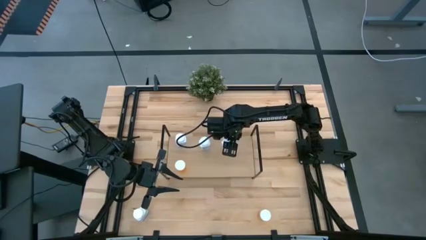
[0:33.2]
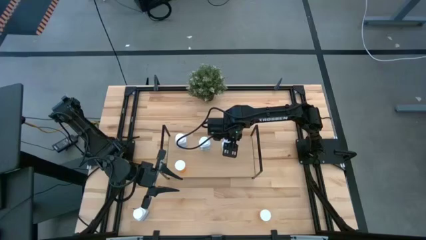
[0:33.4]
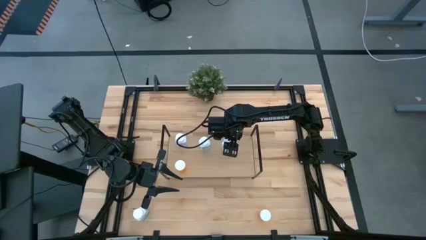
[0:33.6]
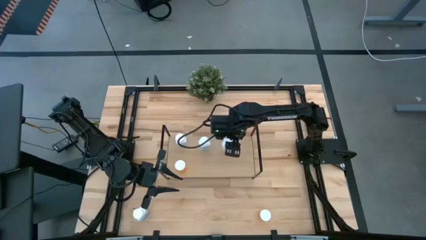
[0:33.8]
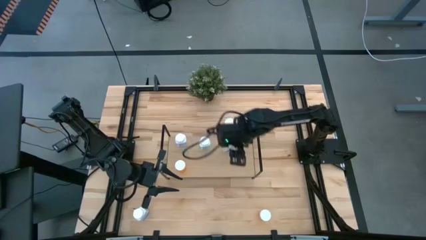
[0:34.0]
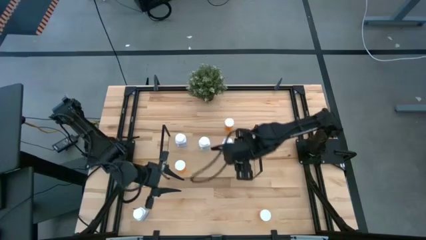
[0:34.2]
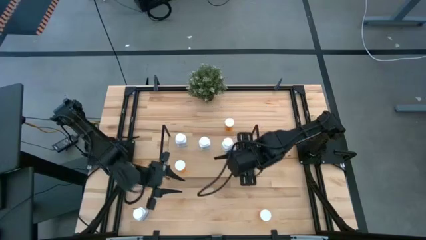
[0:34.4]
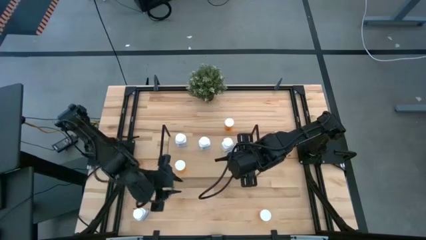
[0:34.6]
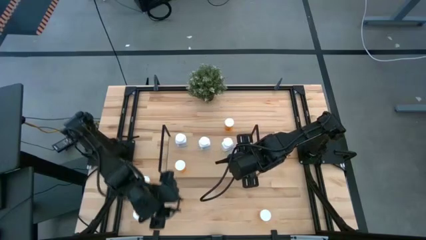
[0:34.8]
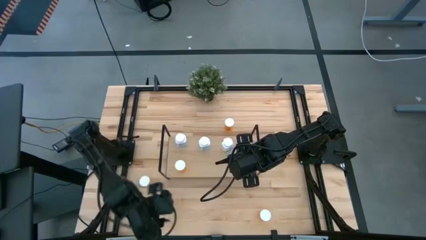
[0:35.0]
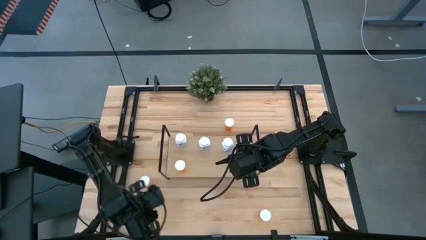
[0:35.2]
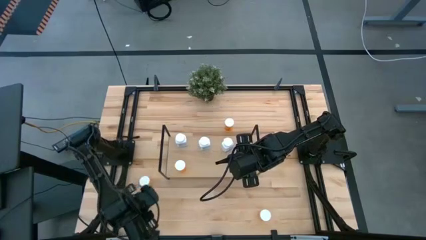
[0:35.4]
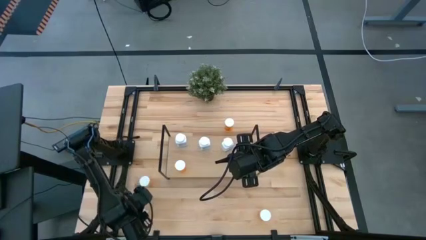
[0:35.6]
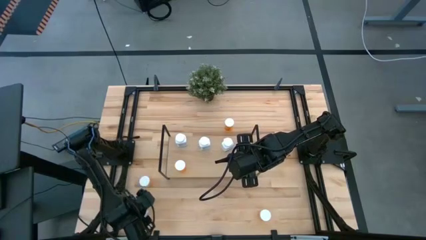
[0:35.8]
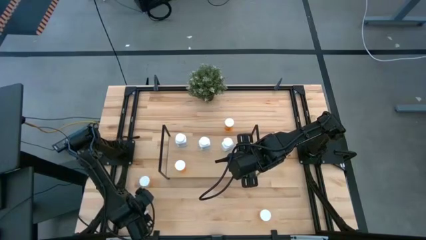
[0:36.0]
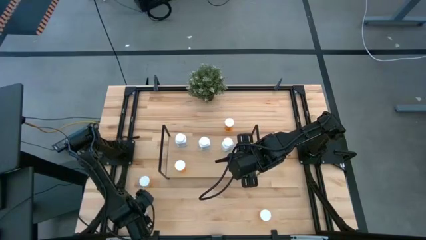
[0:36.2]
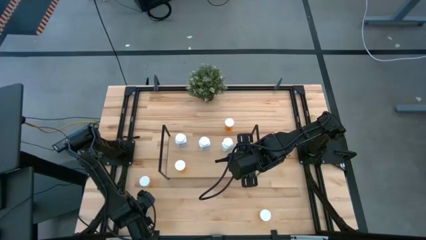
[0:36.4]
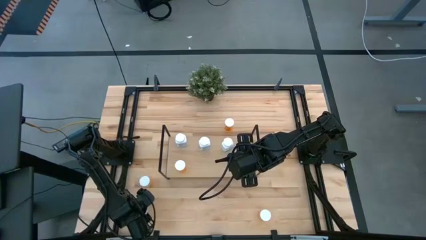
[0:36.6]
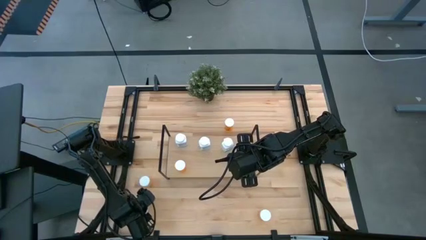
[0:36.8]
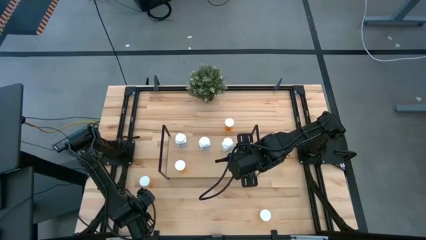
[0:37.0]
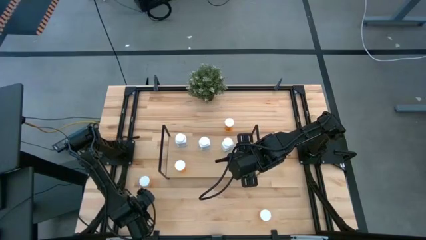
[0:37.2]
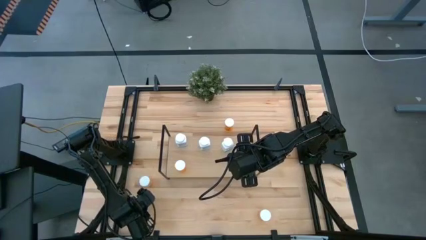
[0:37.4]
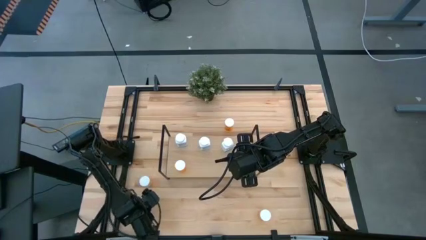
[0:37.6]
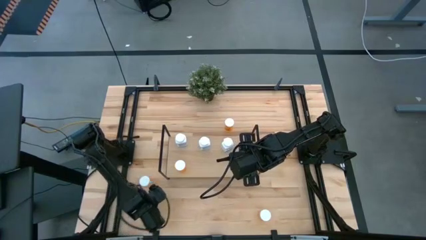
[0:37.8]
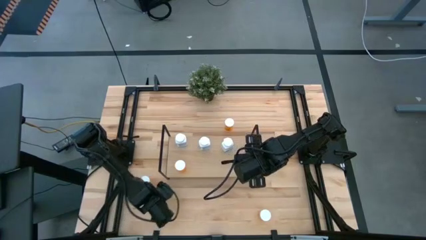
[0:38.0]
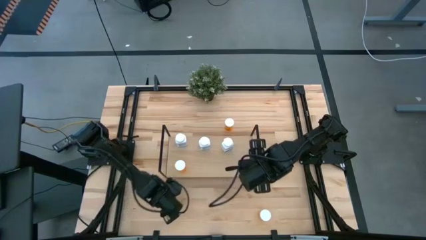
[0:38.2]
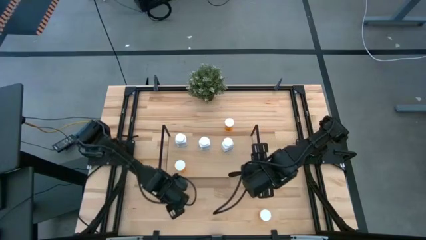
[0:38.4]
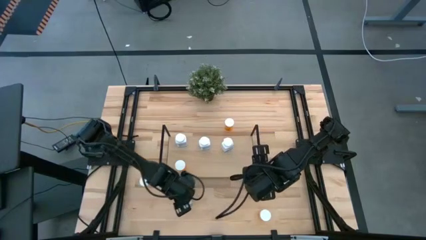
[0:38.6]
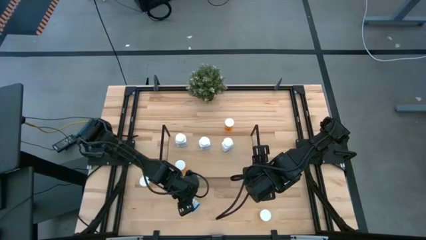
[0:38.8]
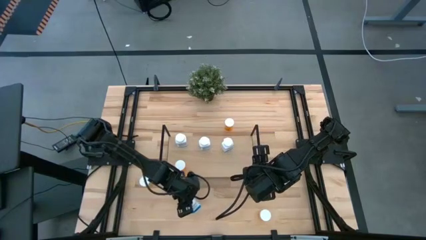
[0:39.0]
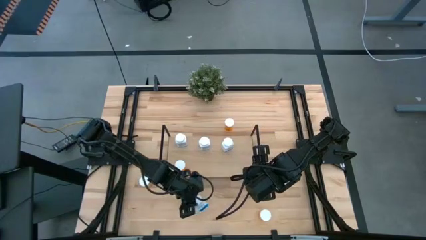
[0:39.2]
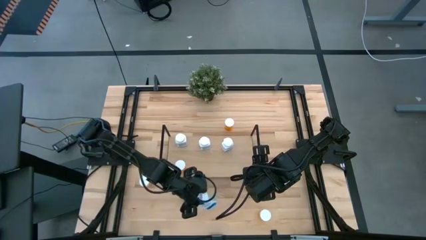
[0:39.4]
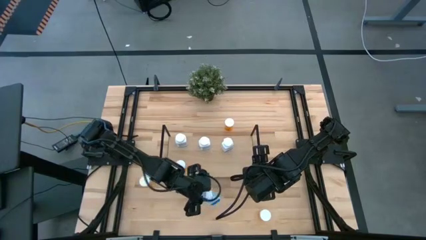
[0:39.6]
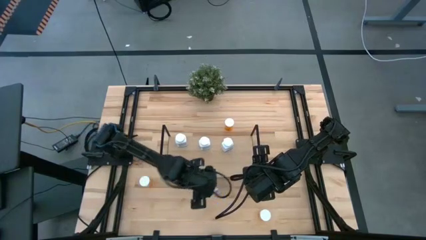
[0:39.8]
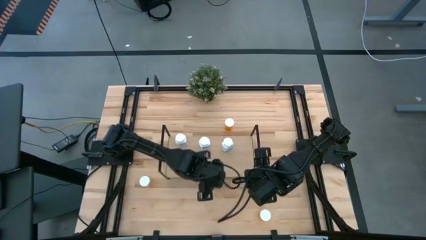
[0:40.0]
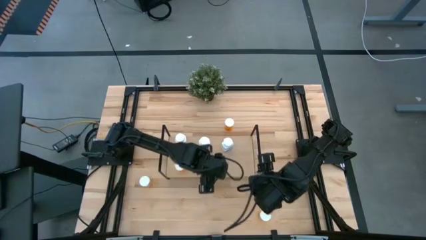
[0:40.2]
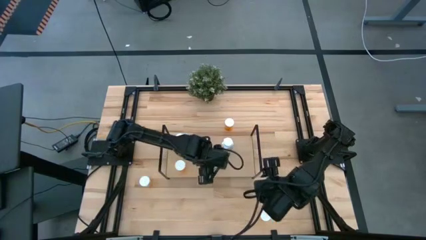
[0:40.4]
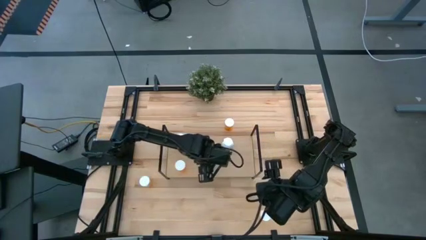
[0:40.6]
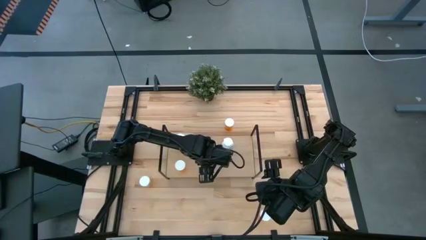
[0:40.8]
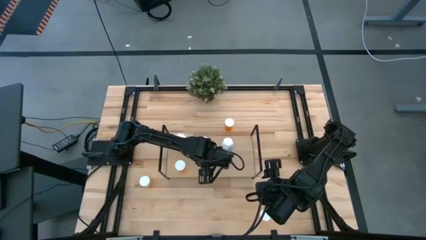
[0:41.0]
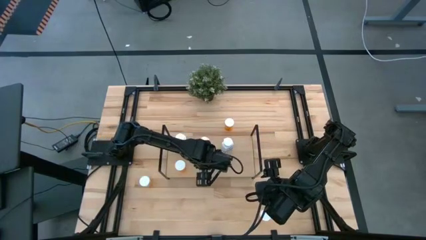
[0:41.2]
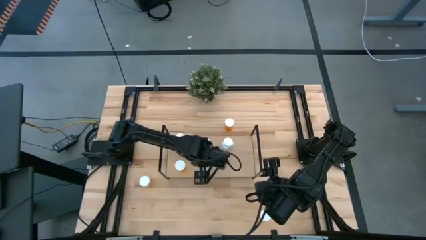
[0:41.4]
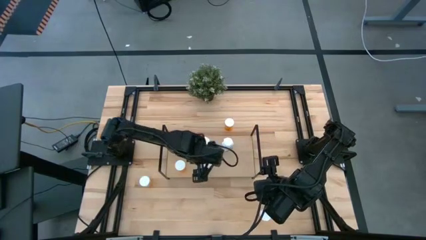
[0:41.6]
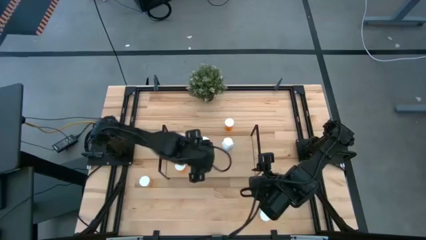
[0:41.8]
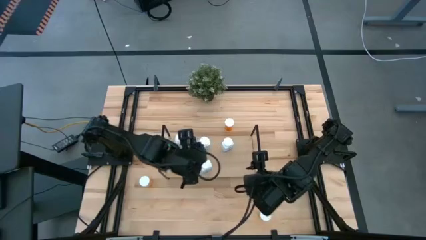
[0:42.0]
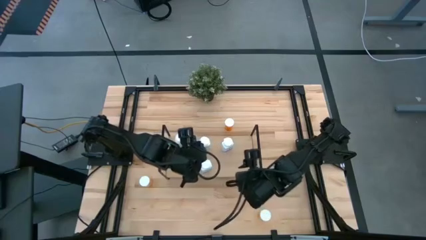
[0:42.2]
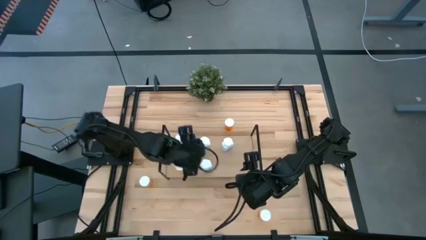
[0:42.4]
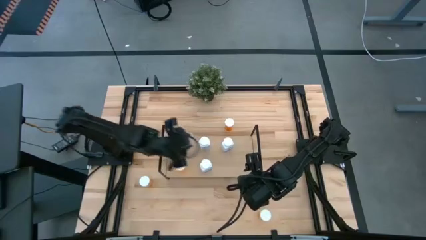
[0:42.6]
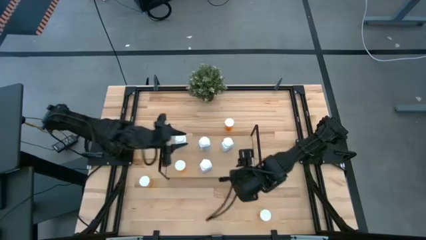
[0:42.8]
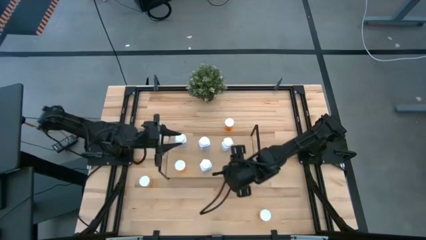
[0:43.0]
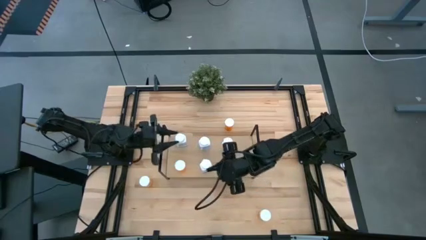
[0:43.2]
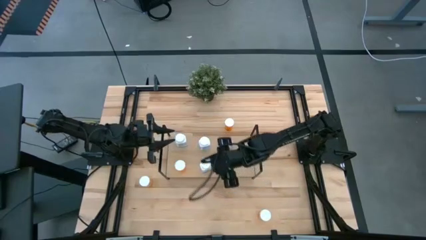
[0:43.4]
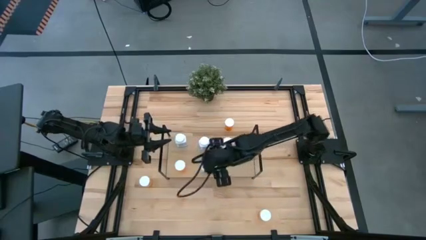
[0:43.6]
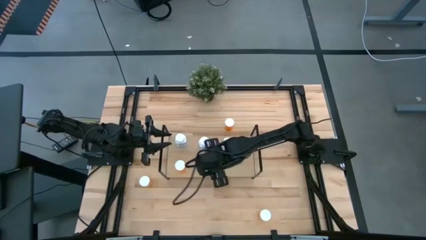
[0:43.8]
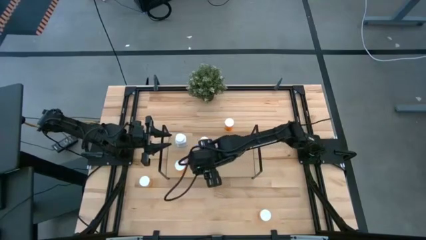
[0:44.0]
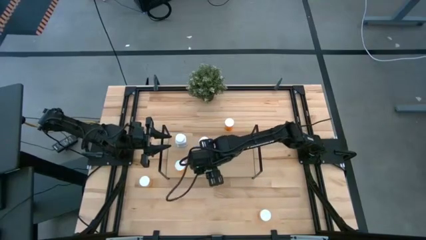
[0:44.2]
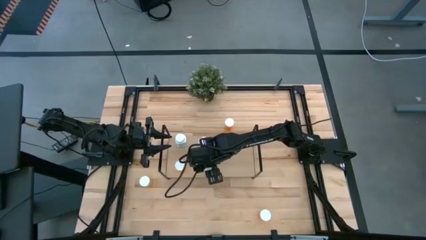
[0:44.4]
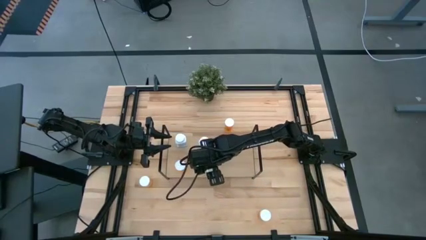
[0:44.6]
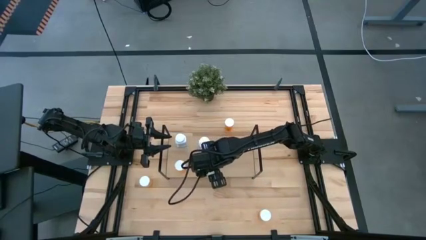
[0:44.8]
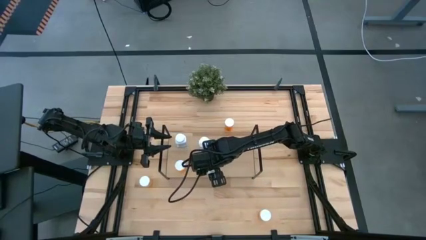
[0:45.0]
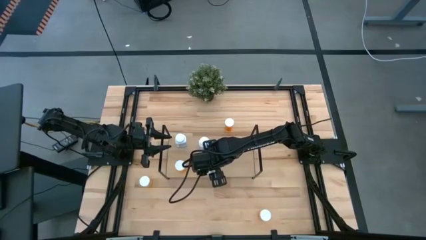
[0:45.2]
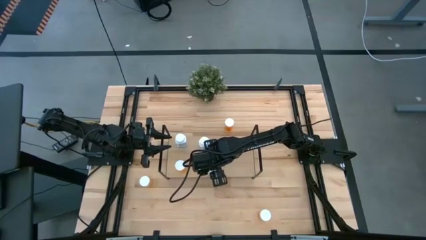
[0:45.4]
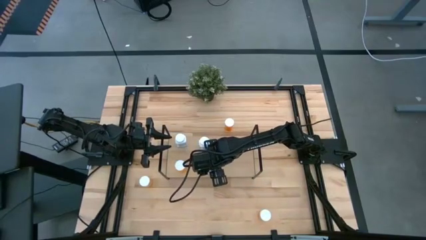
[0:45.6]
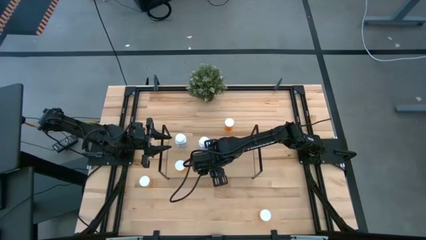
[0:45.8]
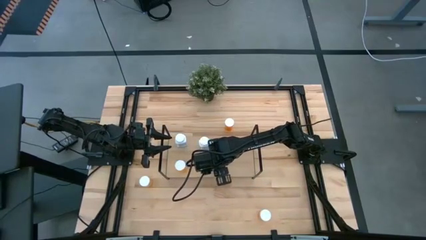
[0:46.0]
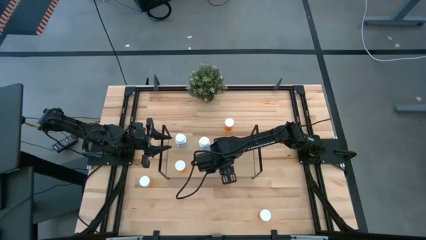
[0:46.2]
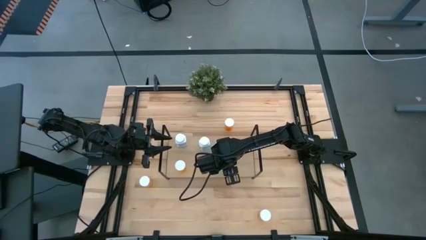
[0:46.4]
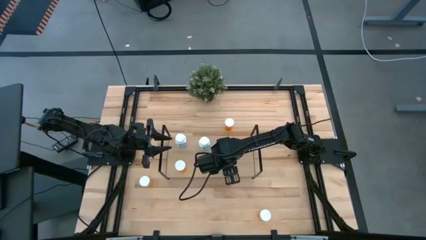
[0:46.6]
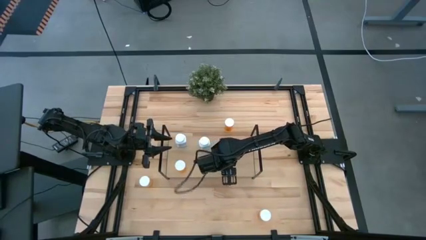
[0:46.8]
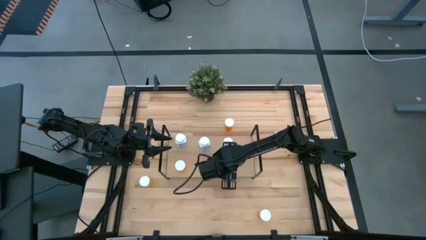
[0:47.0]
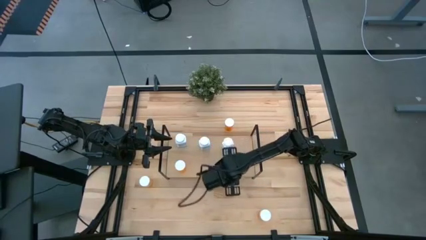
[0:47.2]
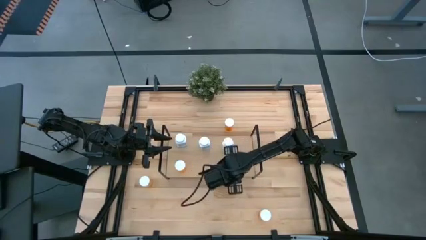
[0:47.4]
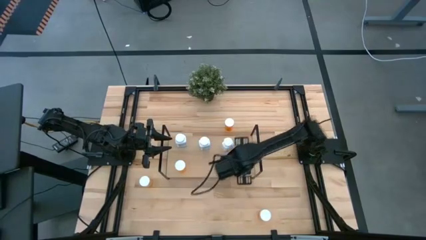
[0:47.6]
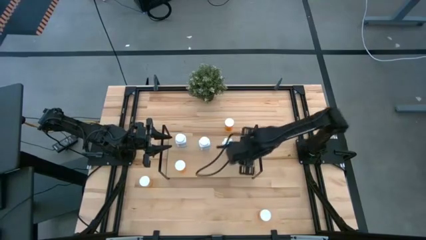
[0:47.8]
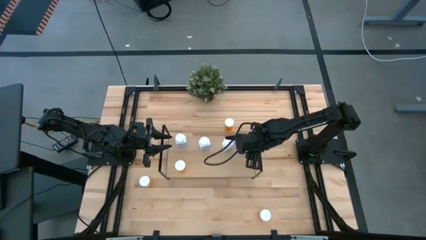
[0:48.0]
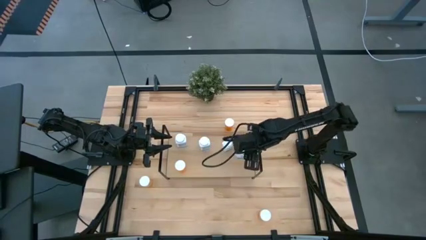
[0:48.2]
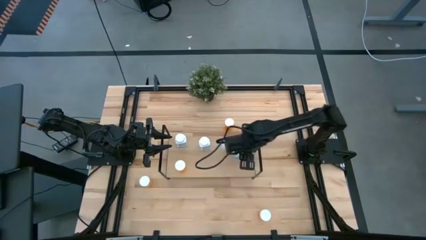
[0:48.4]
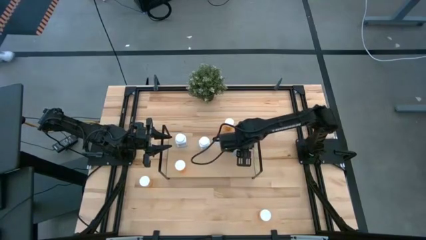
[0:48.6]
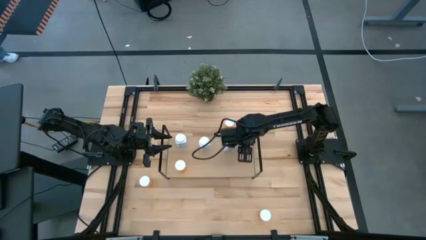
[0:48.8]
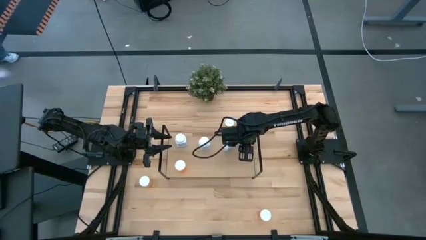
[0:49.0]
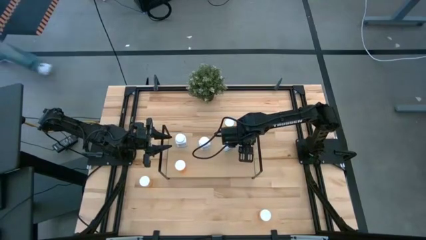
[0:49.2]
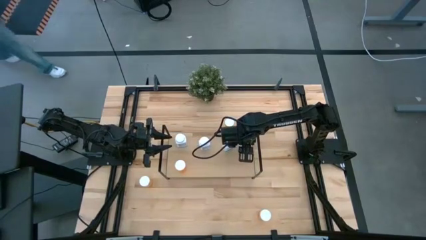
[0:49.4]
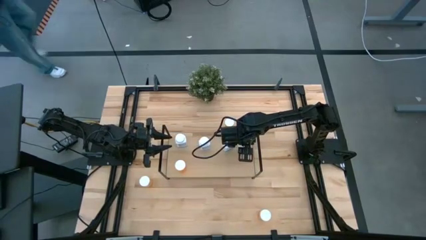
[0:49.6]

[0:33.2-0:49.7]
Task: Pick and place medicine bottles onto shelf by color
Put the white pill bottle on the shelf
